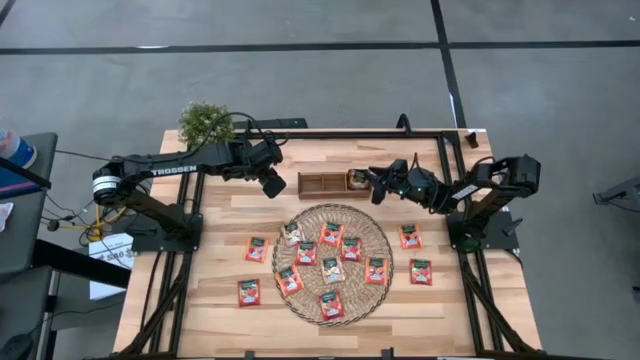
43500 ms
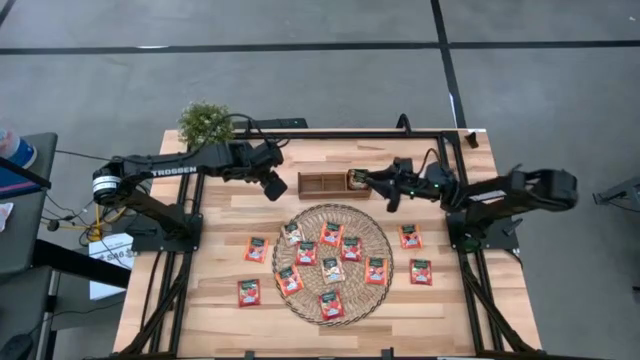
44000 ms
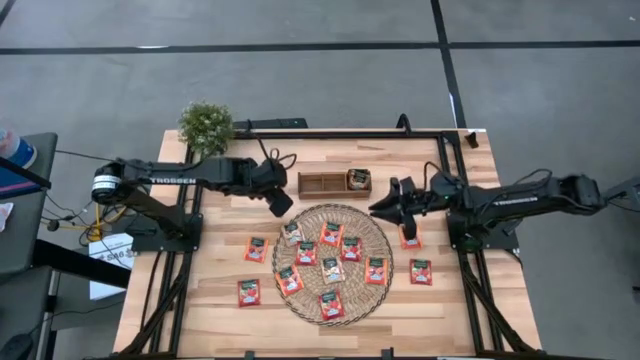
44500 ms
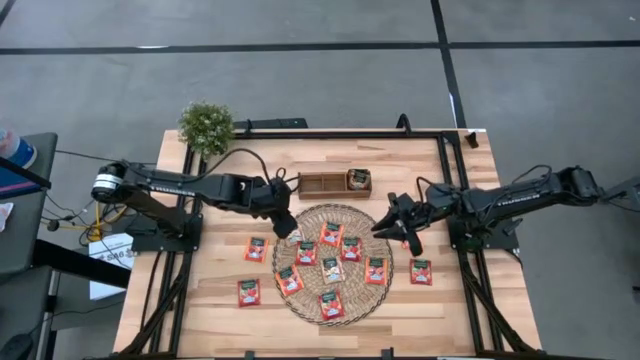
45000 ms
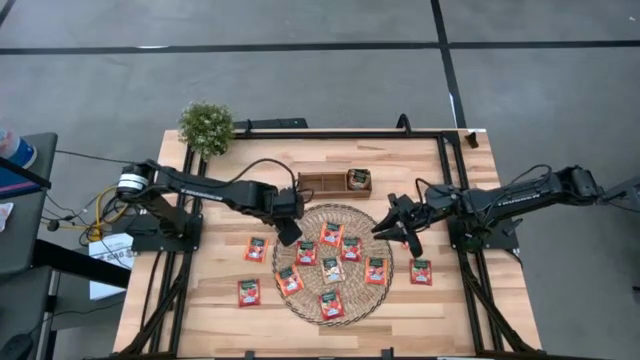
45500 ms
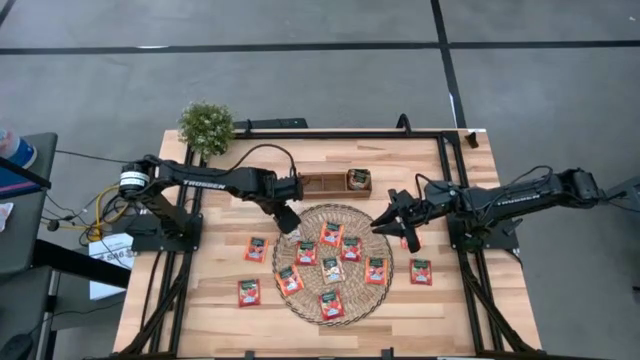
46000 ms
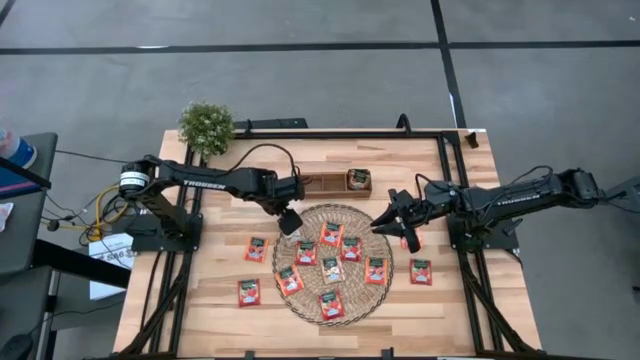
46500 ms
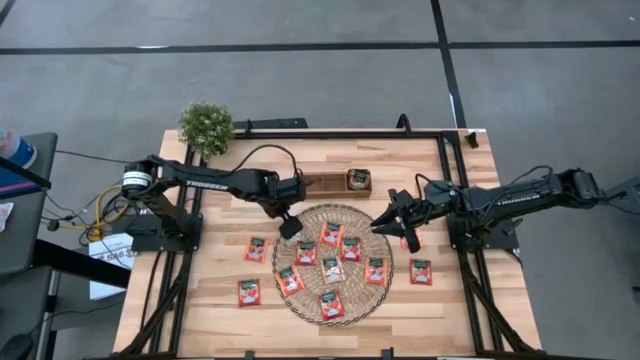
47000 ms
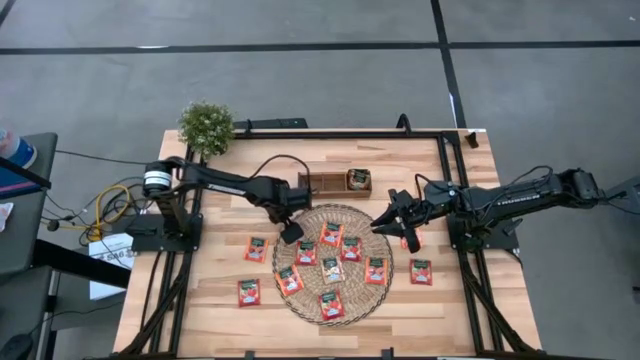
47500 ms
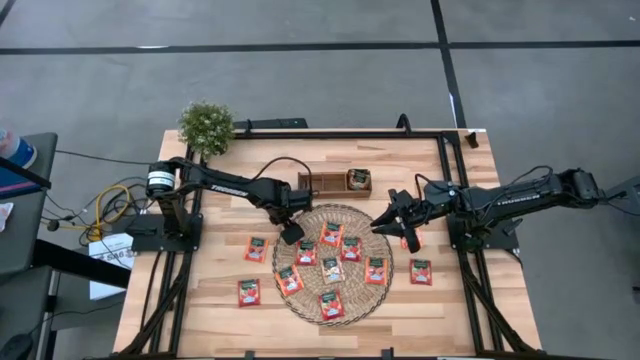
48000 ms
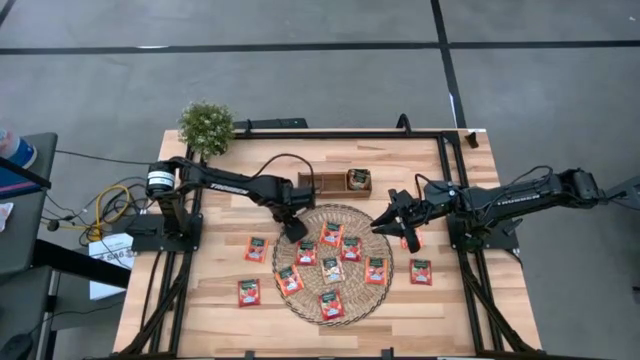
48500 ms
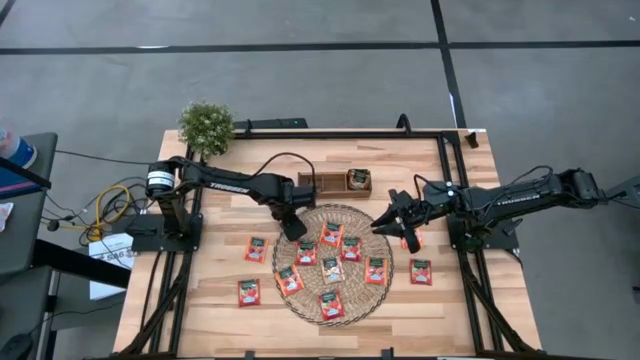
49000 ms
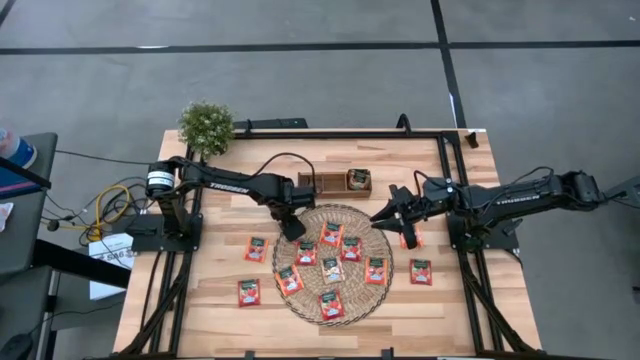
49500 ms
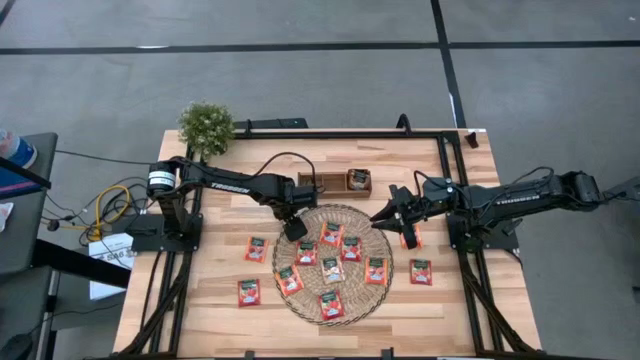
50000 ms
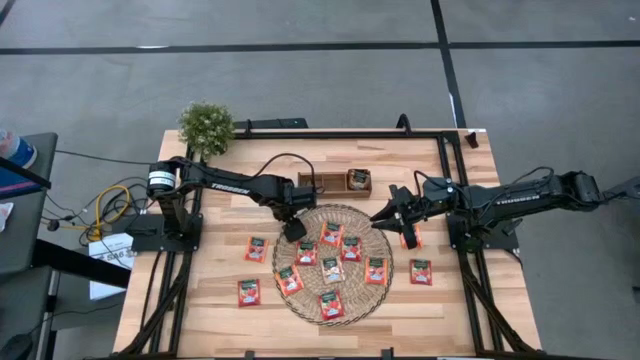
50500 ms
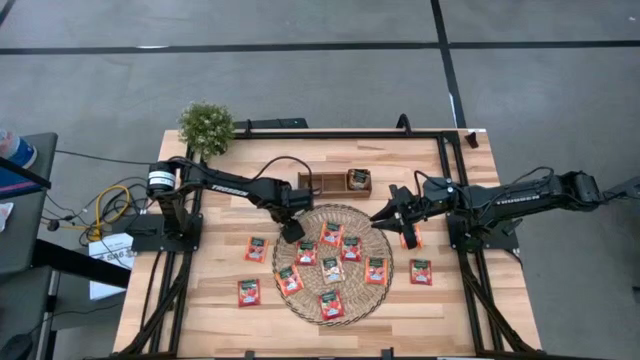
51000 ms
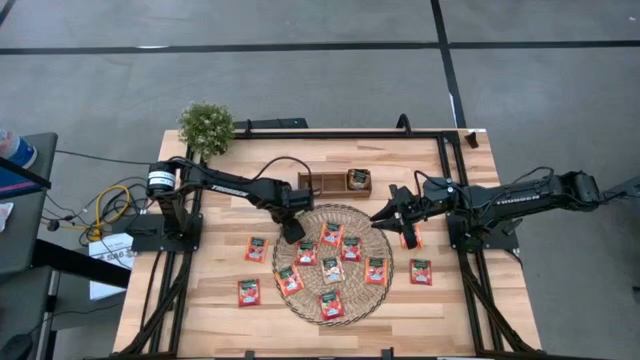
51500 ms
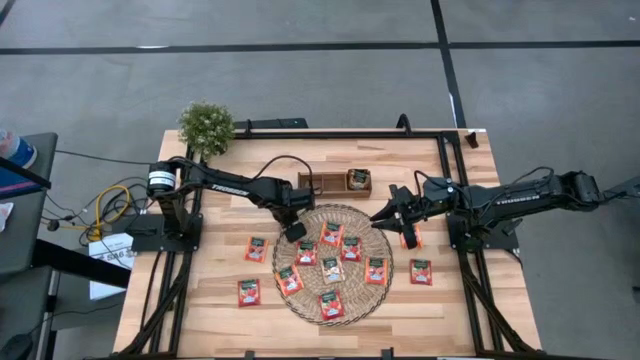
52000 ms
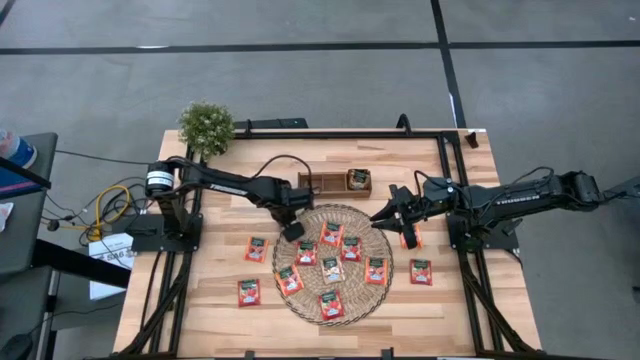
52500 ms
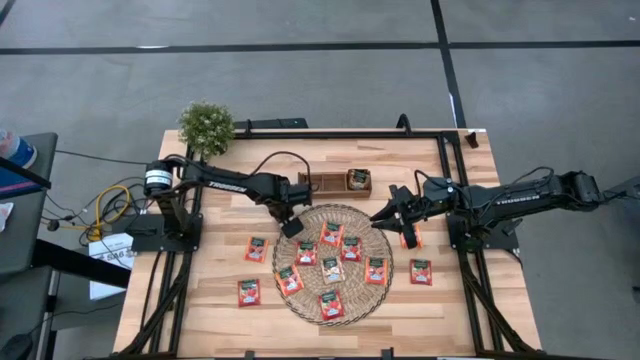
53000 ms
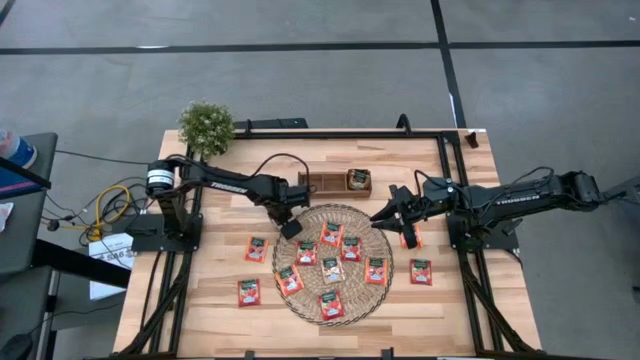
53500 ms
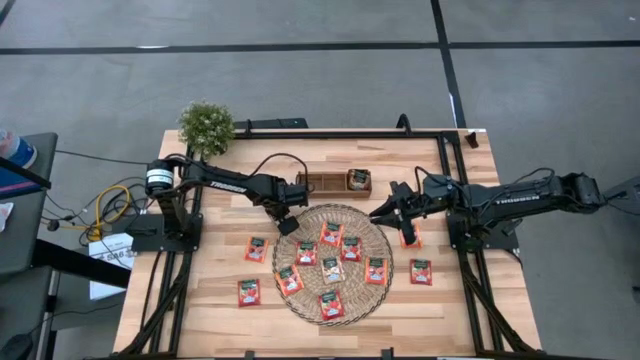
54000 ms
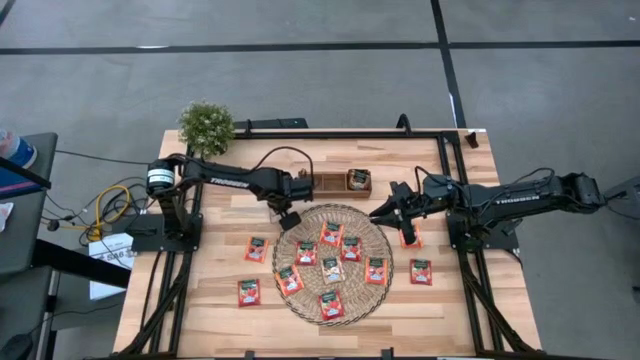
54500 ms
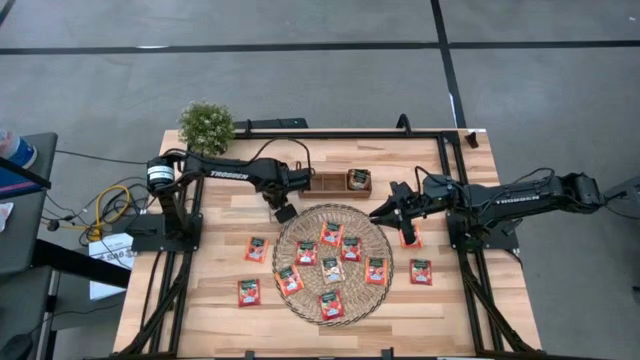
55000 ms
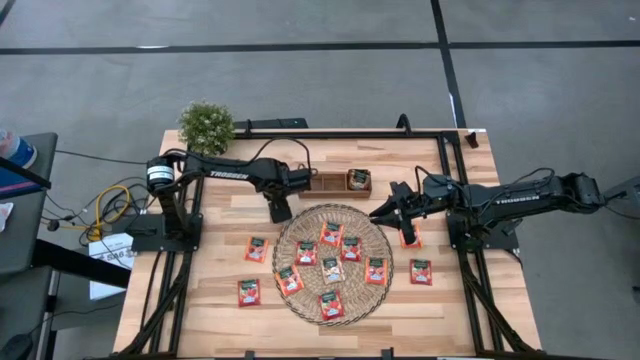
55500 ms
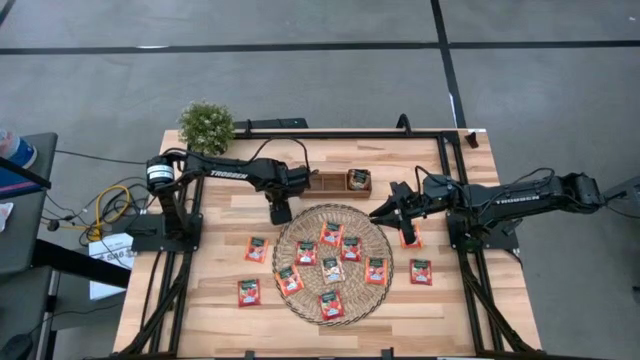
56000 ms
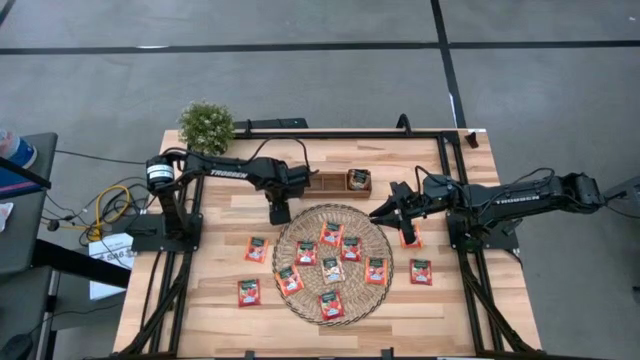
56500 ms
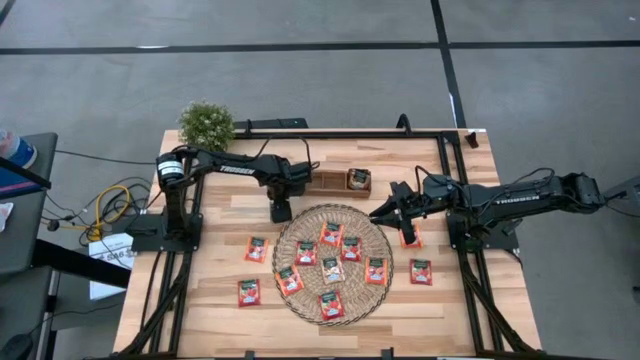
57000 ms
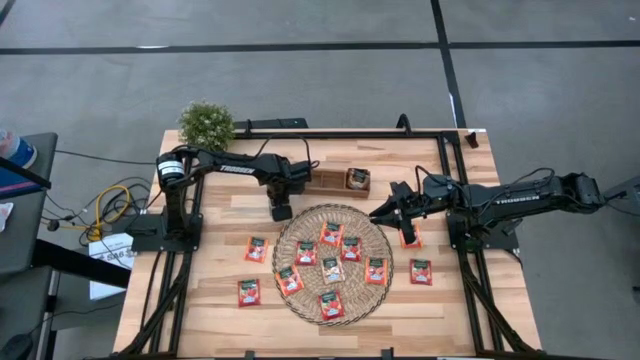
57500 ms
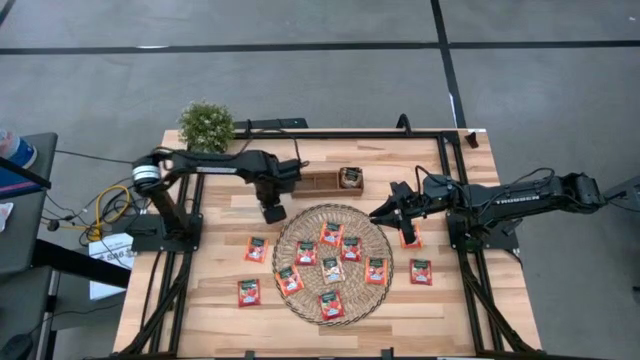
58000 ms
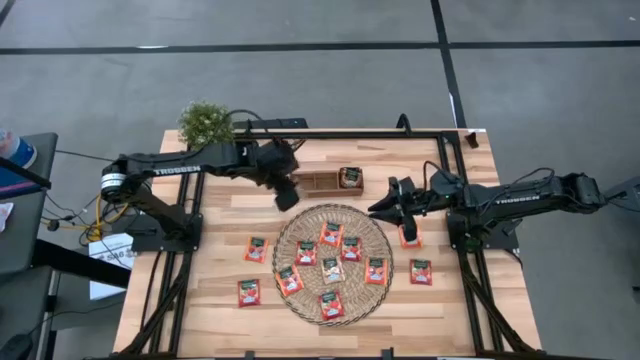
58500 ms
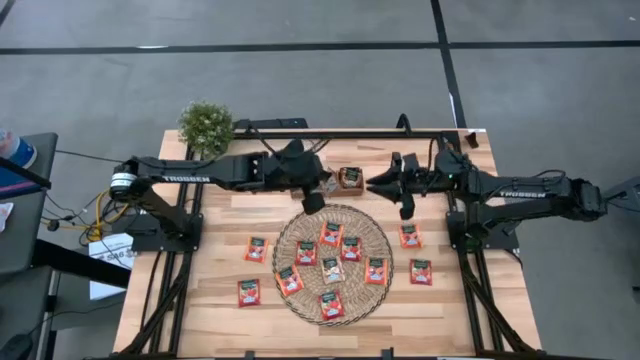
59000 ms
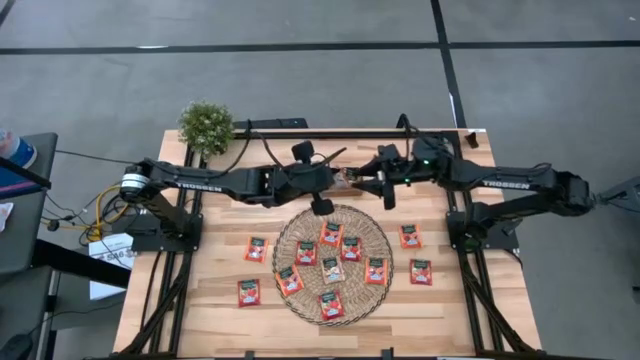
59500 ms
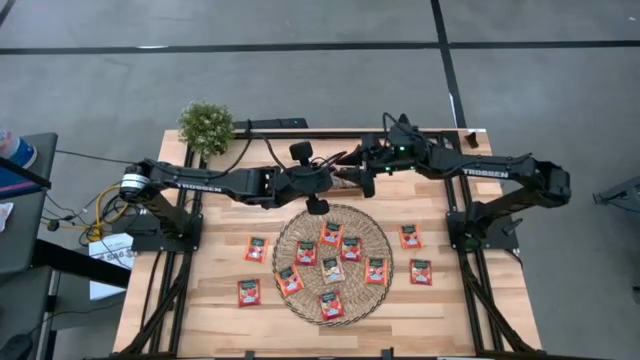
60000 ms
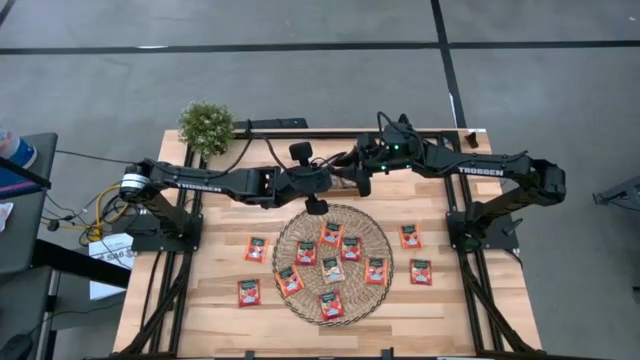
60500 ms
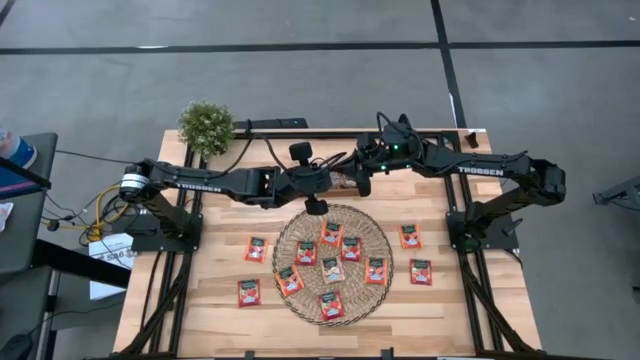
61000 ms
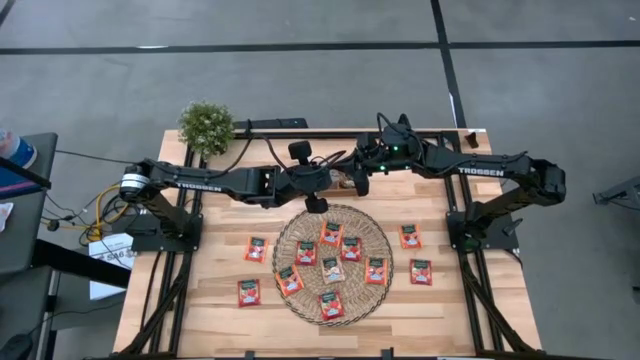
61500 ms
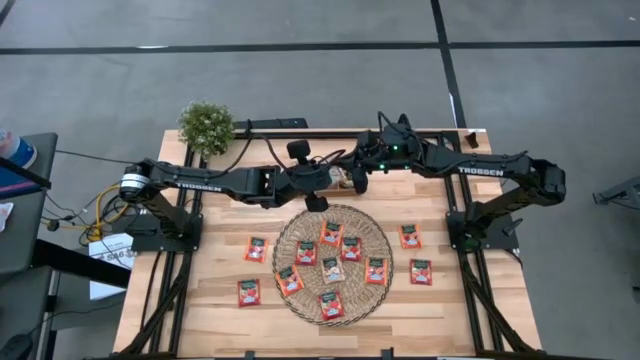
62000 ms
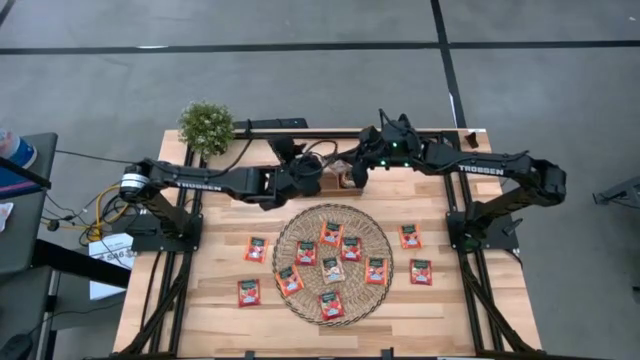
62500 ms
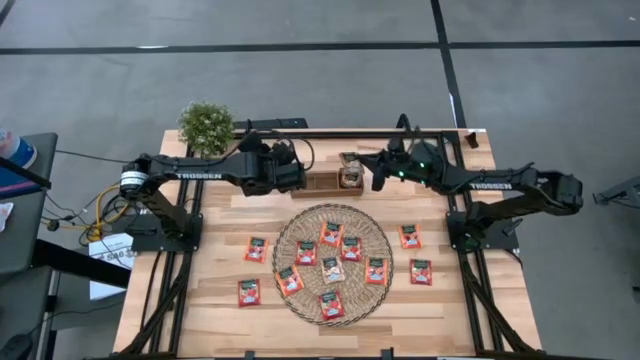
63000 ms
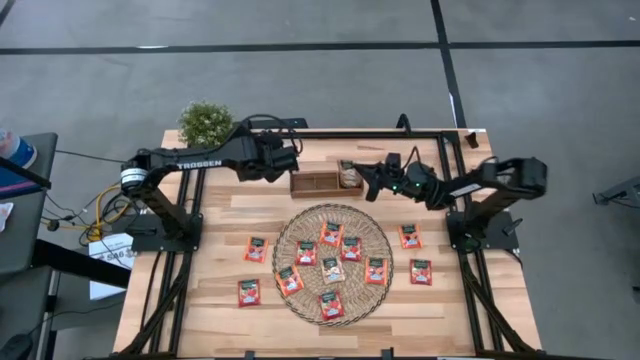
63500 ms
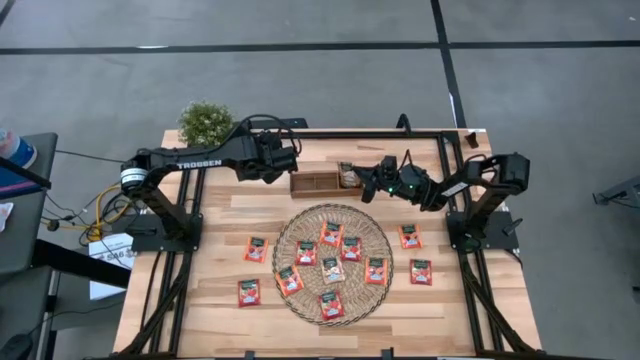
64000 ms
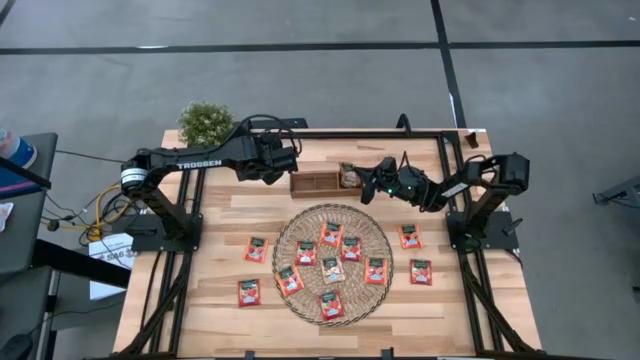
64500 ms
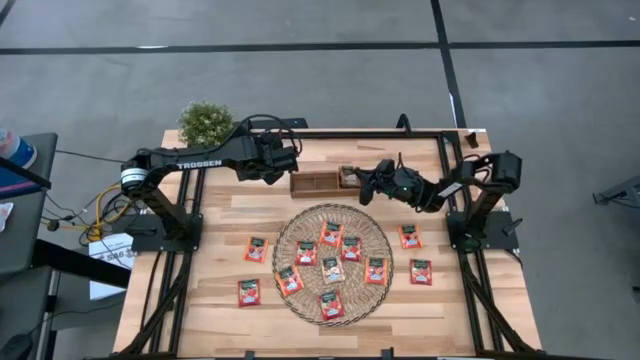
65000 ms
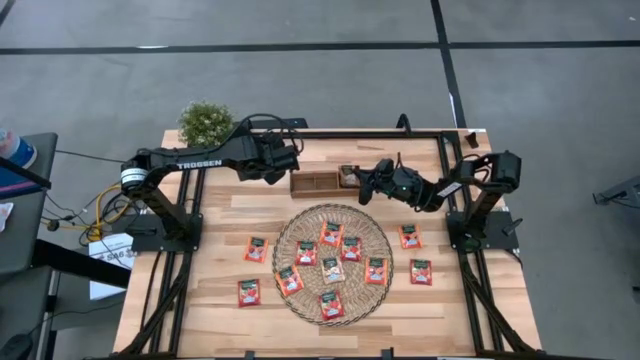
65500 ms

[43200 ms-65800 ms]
Task: Pick & Place Tea
Put the gold tea bag into the wooden organizer
